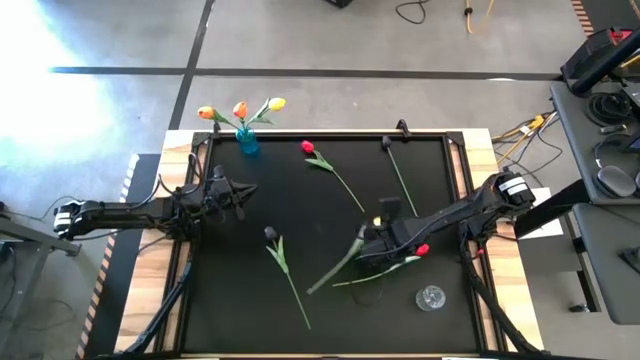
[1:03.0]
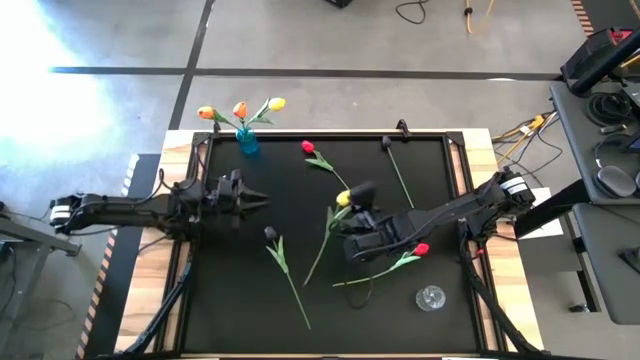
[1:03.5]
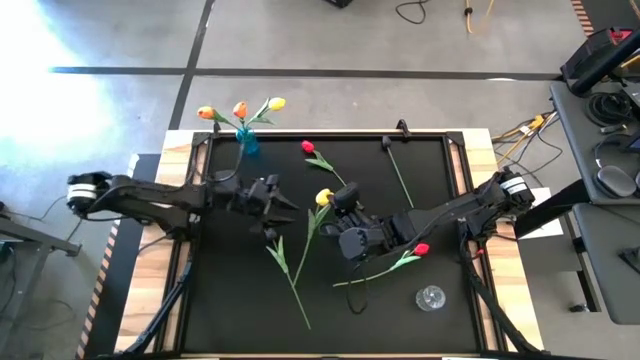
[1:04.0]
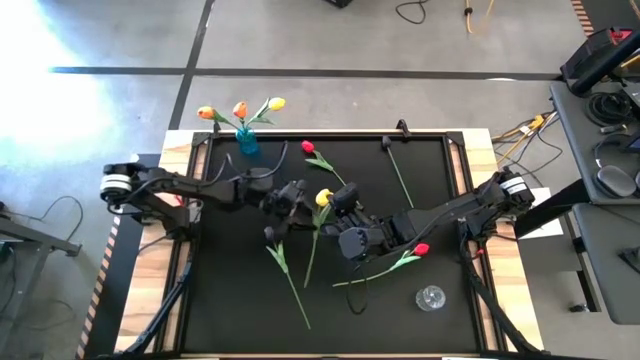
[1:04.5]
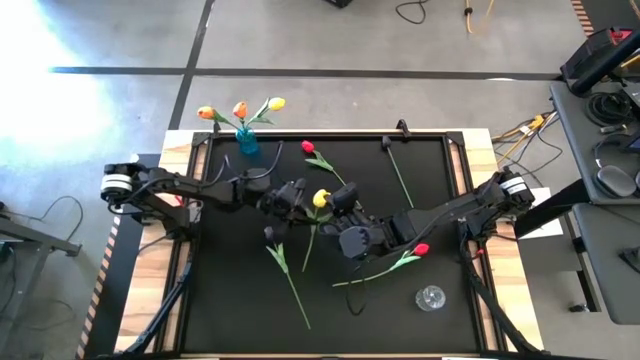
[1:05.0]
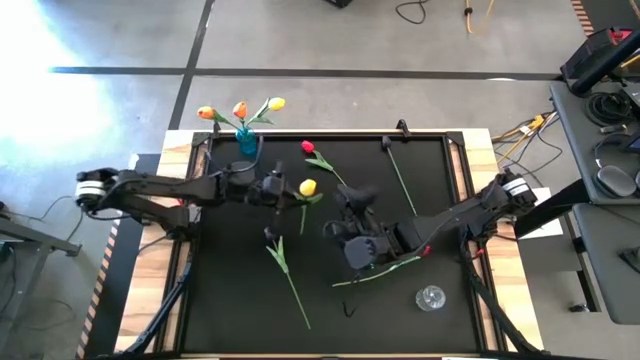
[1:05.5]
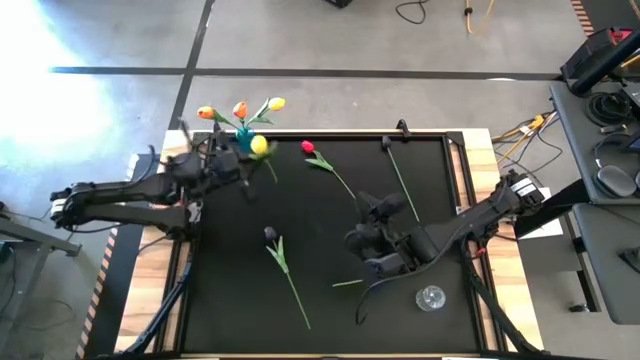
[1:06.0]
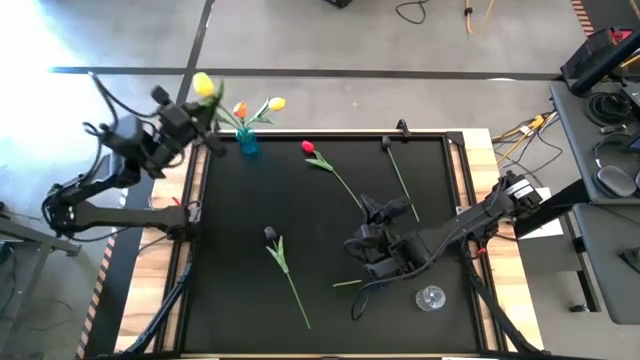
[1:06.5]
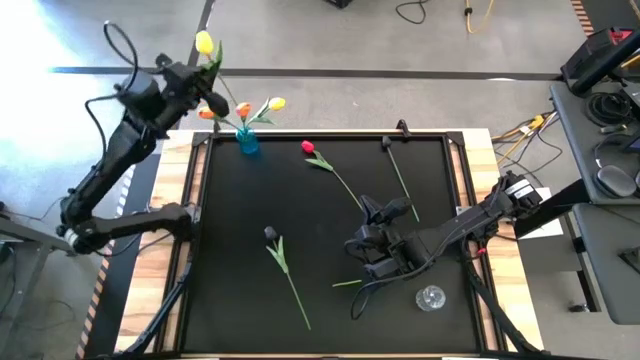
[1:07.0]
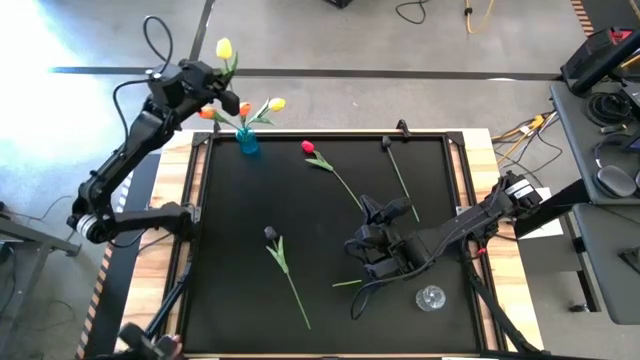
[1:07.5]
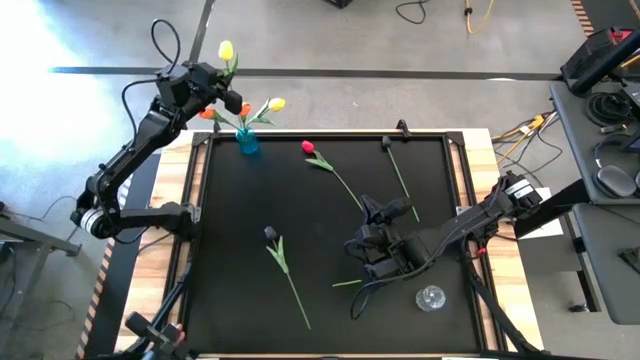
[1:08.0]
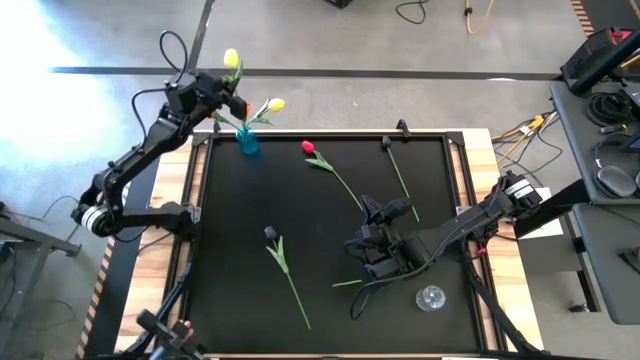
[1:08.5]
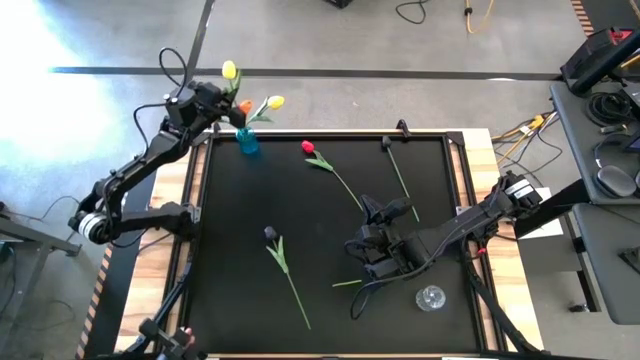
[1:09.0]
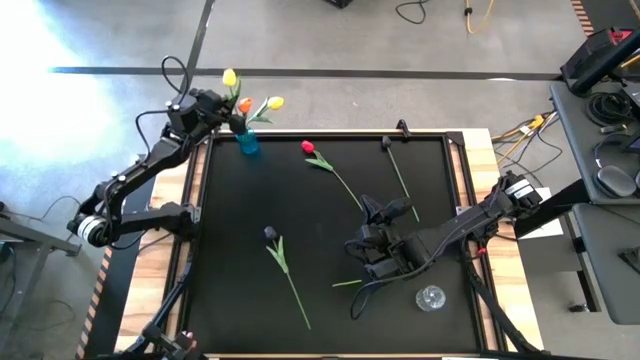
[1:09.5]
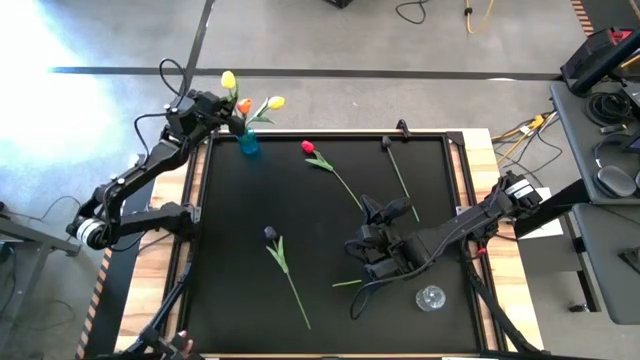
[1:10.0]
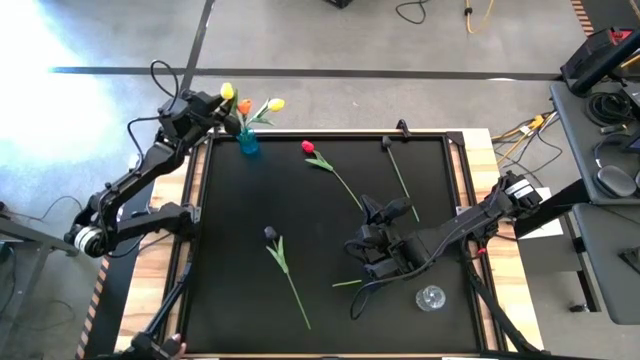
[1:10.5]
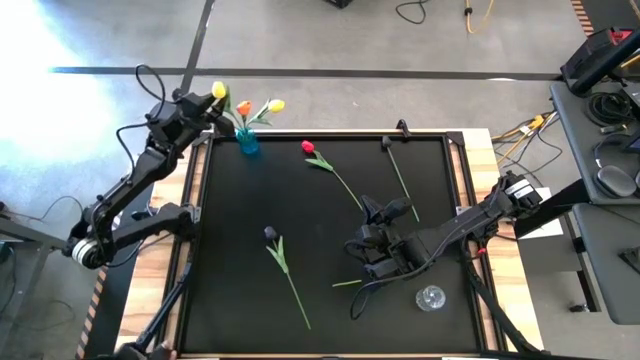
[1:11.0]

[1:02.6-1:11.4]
Task: Sort flowers into vase by color
Put the yellow flower into the blue vase

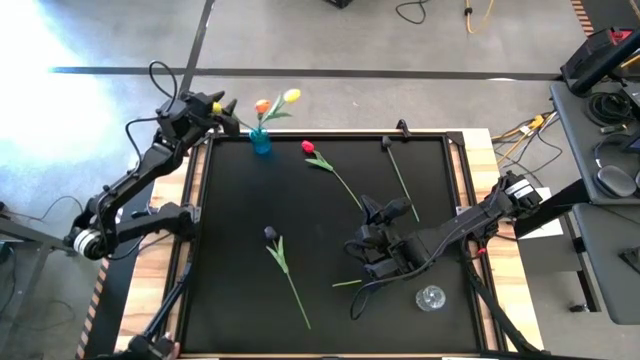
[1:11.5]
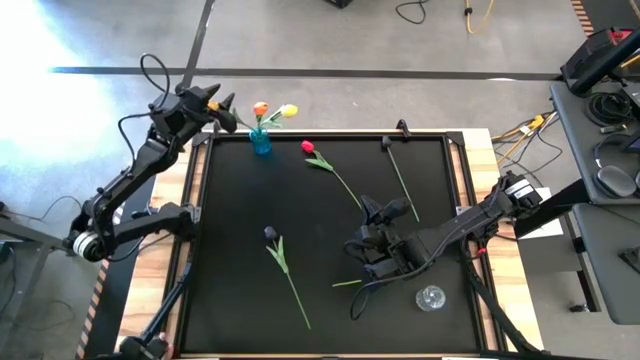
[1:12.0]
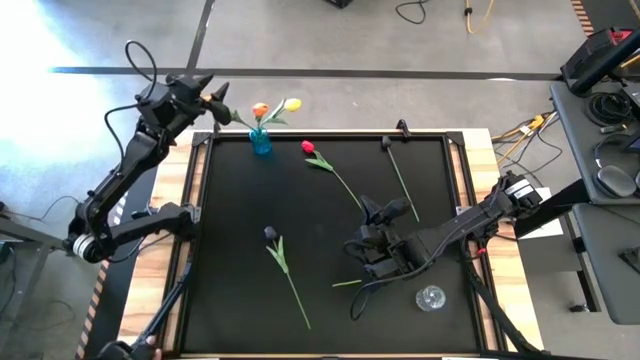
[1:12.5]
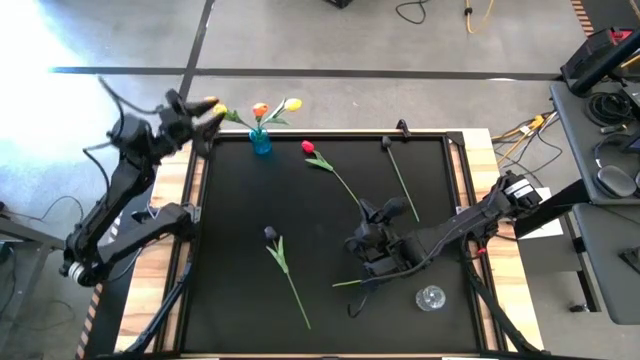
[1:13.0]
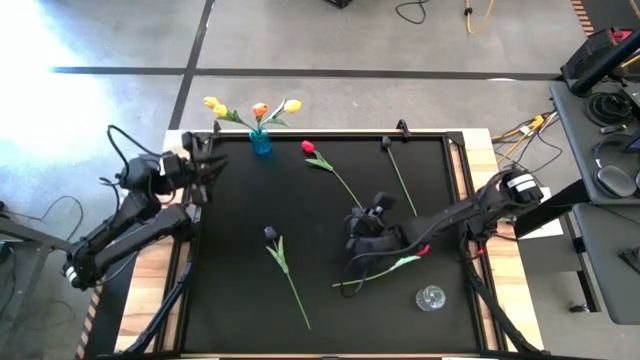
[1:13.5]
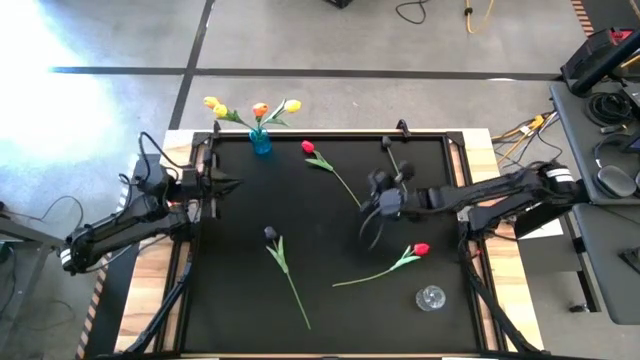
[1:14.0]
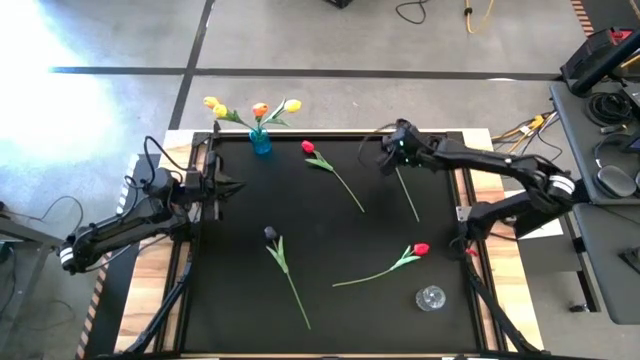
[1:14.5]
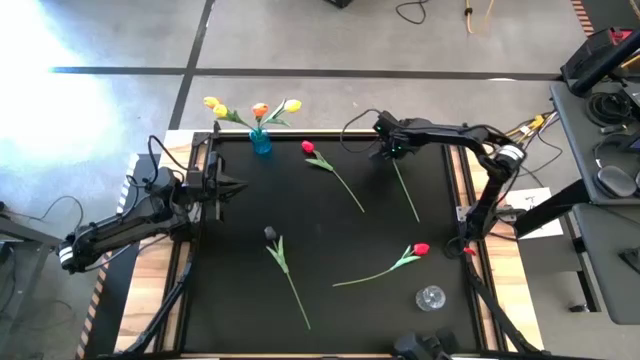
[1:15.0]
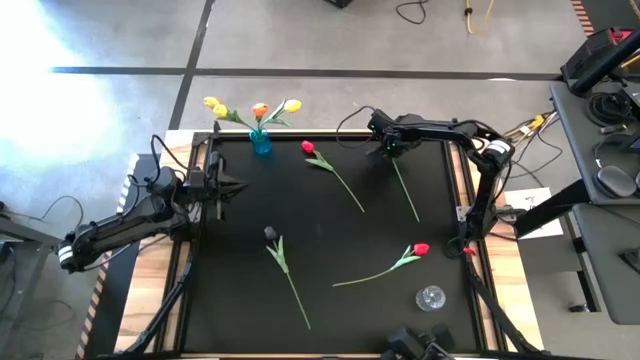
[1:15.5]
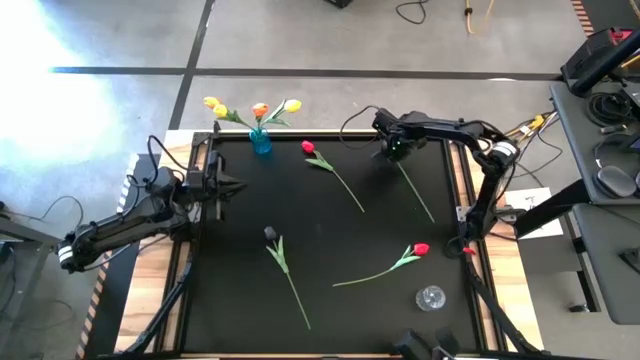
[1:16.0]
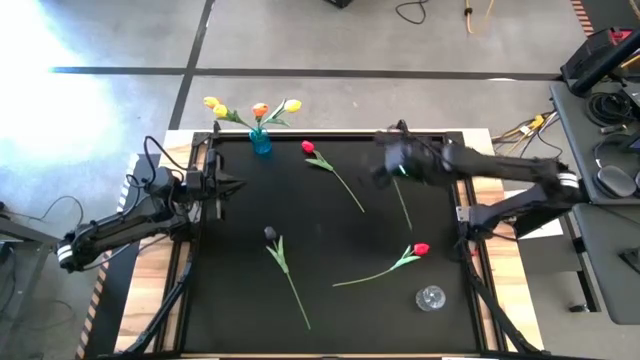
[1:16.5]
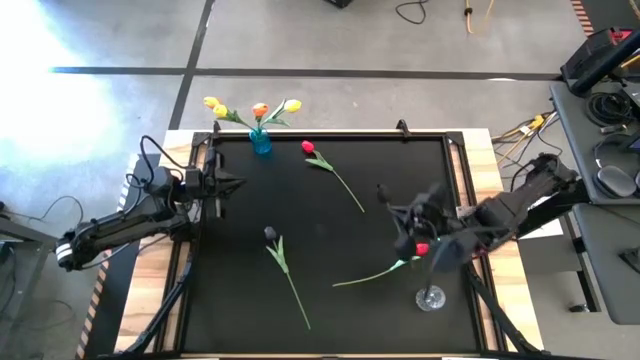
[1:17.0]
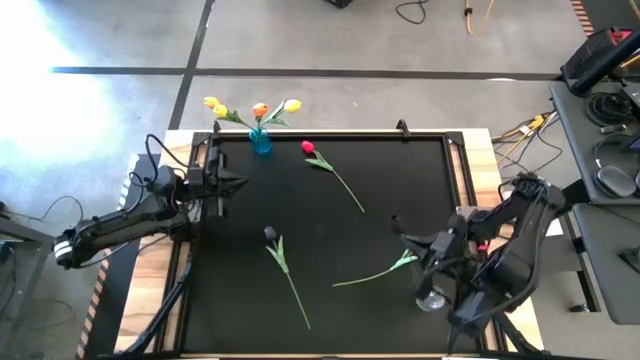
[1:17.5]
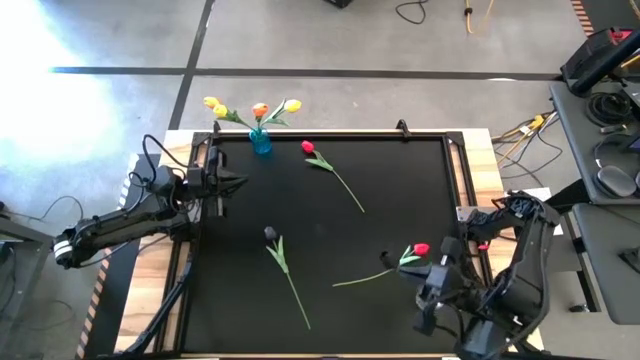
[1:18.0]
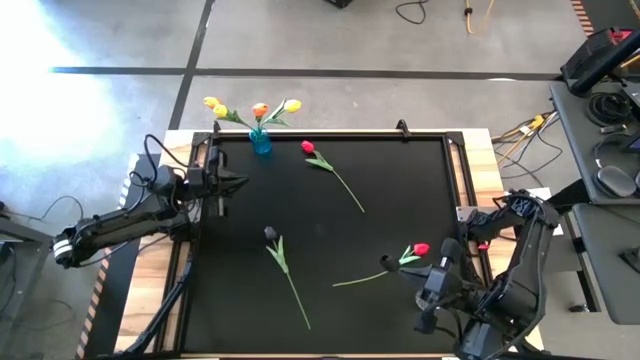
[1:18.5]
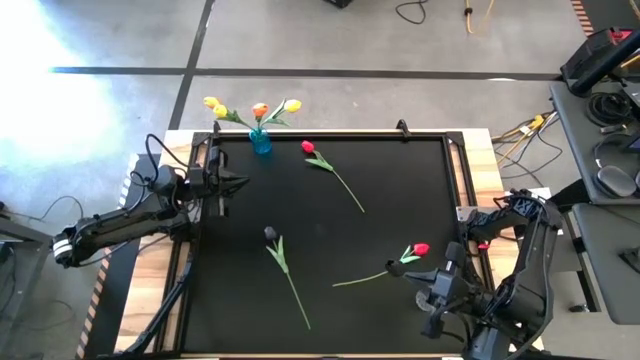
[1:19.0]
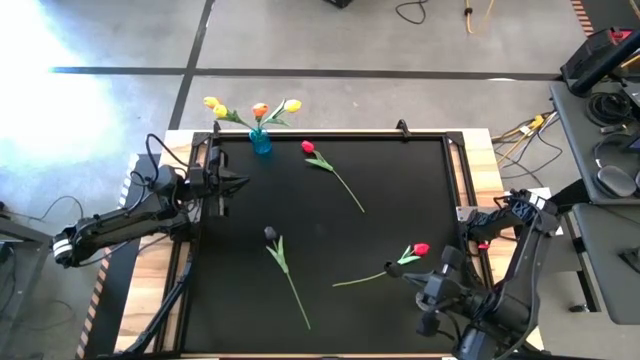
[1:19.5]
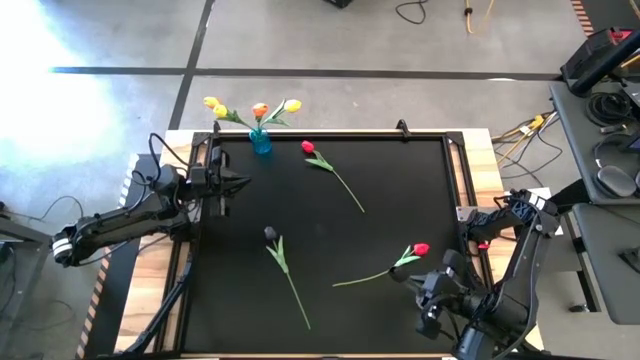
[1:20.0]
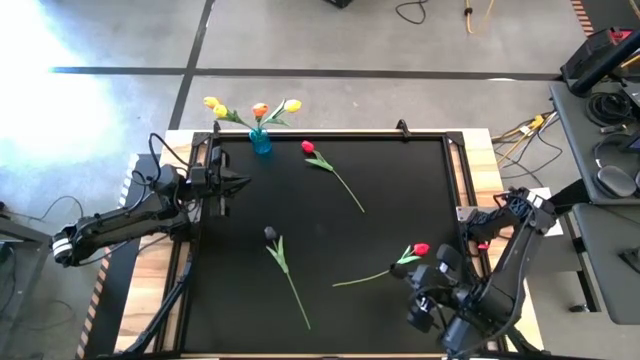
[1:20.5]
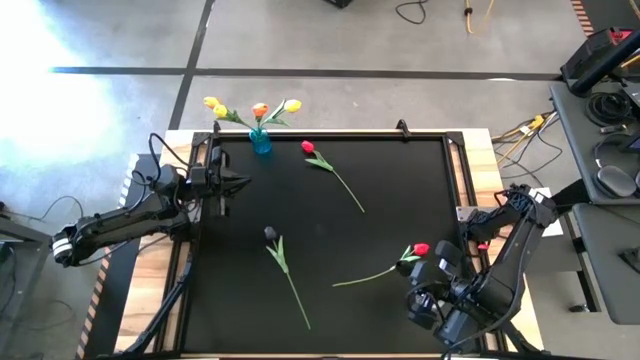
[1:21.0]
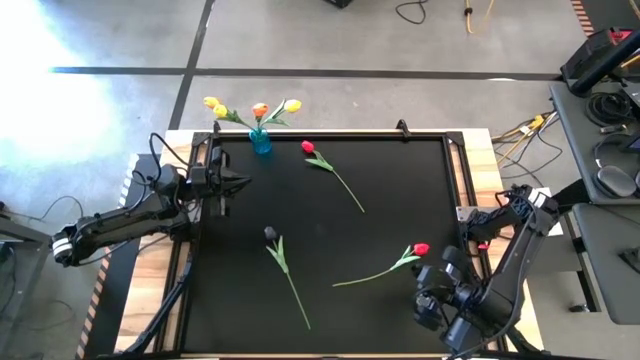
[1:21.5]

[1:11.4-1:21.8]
Put the top black flower into the transparent vase

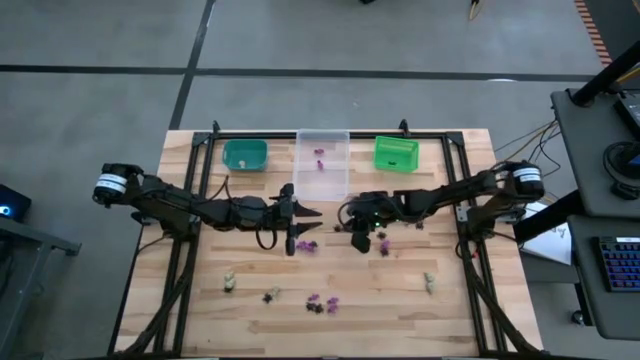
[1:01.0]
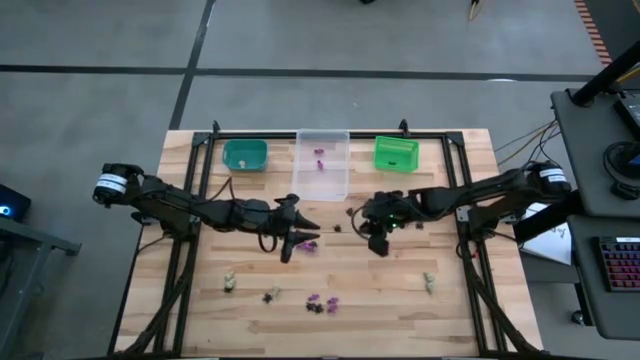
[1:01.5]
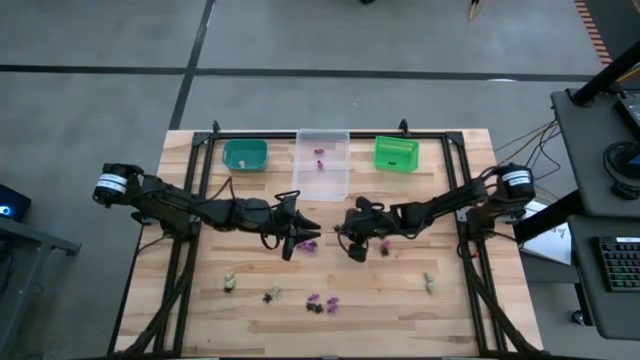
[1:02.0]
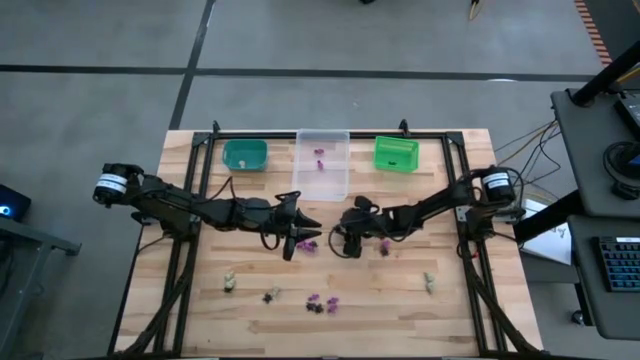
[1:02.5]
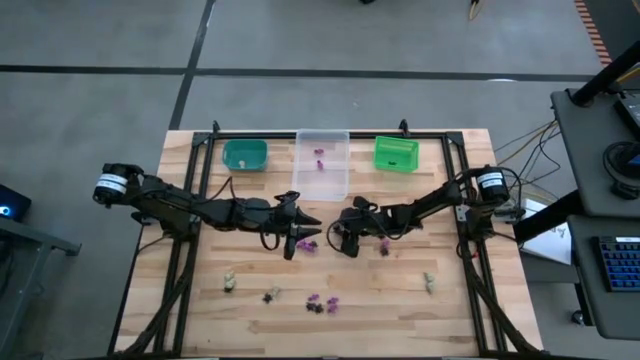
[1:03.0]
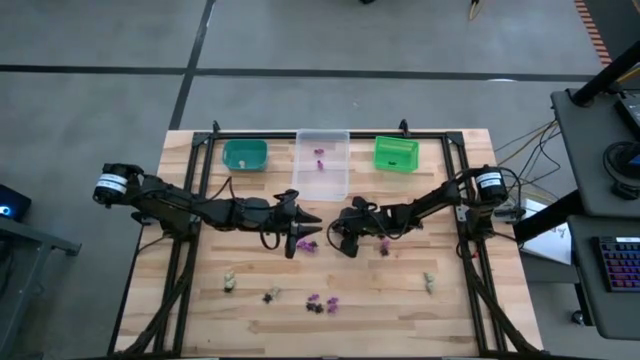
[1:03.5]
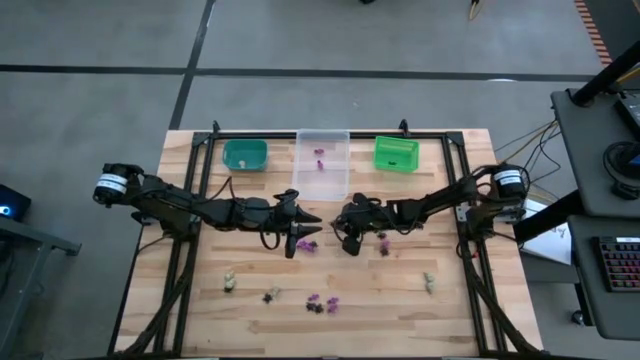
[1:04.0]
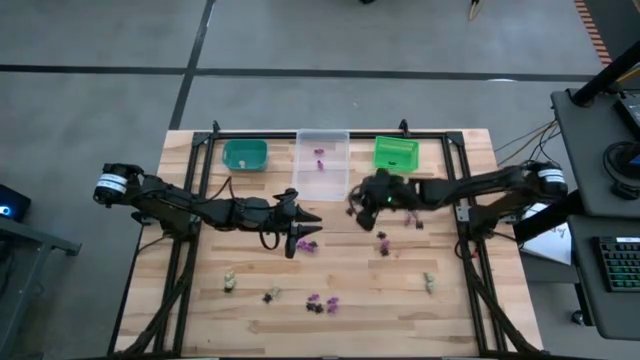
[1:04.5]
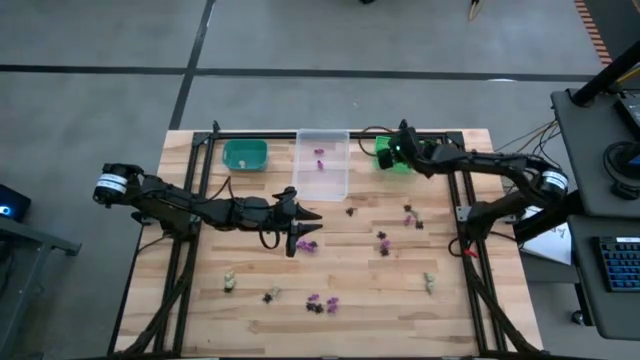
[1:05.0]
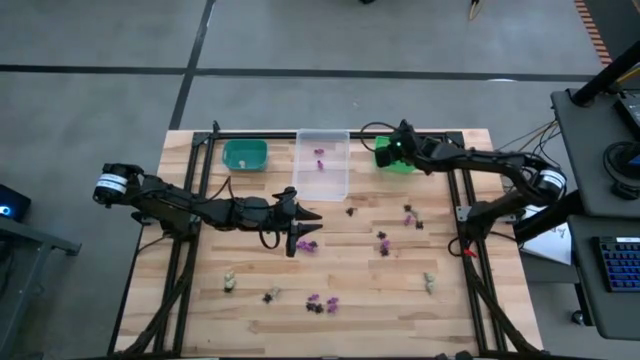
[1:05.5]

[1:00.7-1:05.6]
Task: Sort Halloween decoration
Put the black spider toy into the green bin
